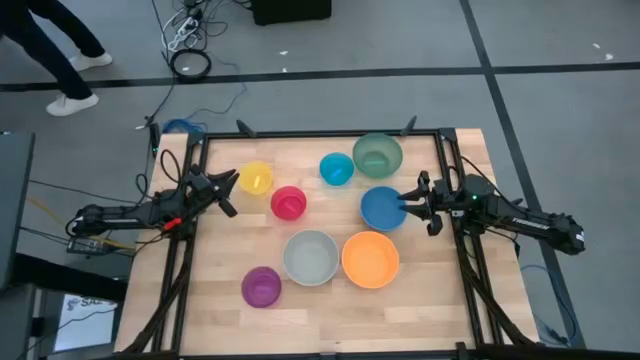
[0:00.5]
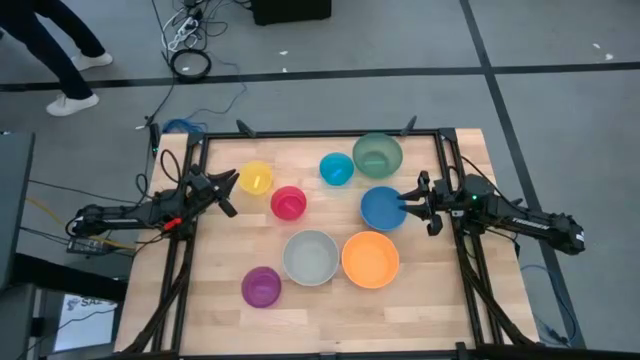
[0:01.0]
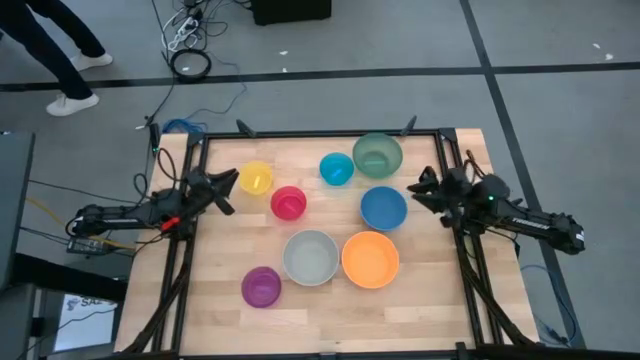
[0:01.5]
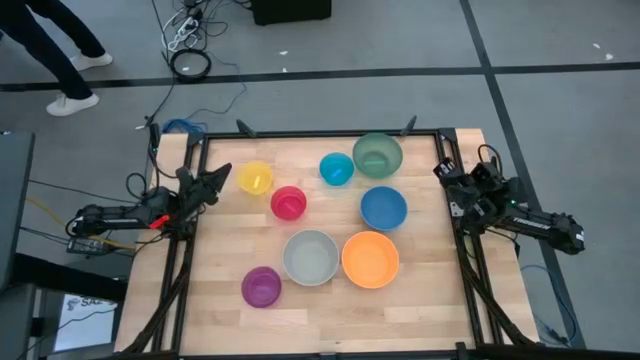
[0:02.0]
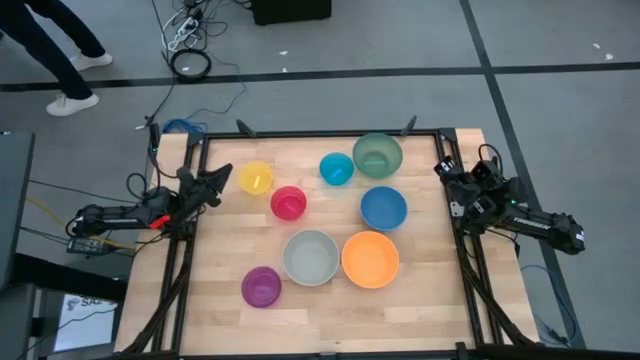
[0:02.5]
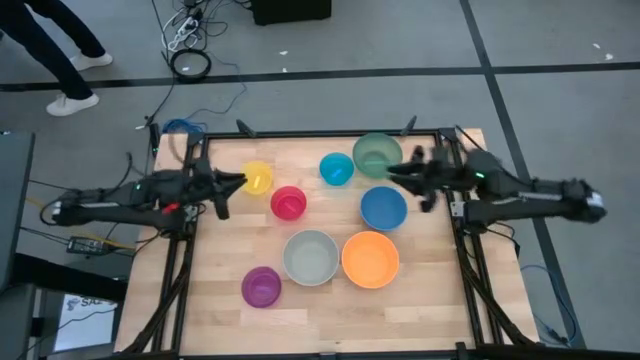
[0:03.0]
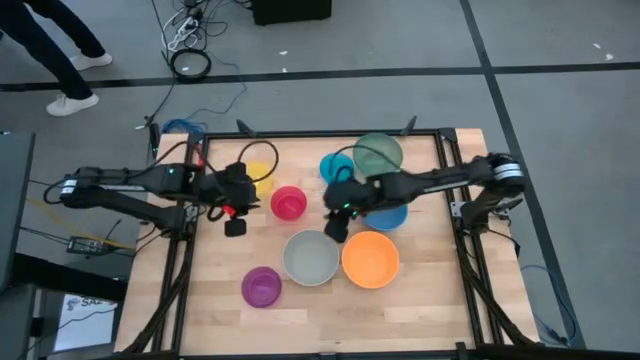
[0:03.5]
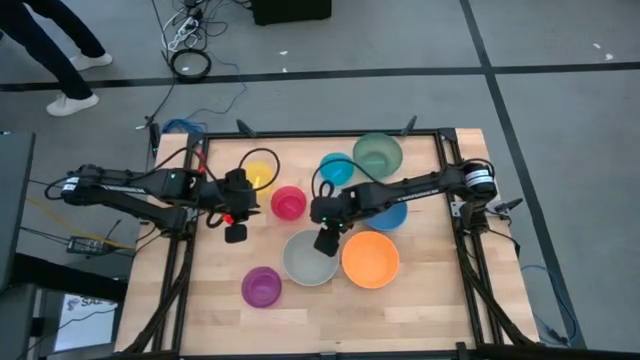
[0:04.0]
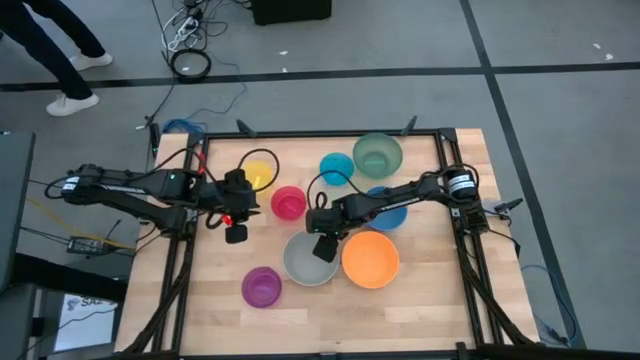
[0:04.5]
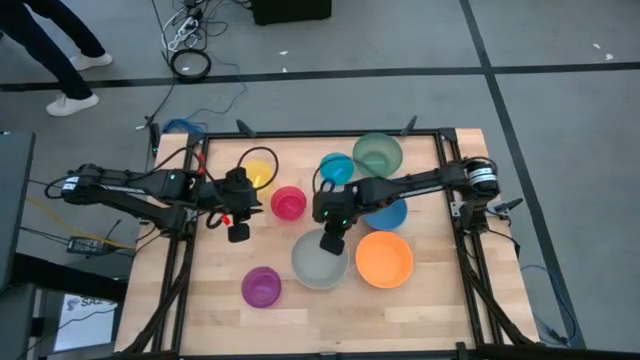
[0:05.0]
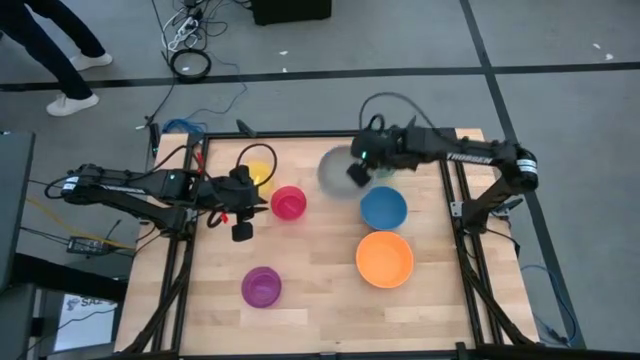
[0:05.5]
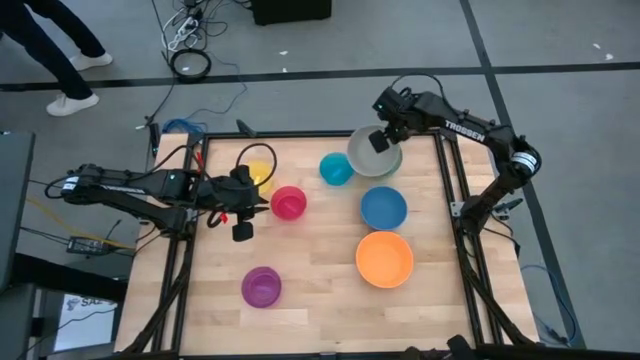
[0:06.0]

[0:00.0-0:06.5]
Stack the gray bowl into the green bowl

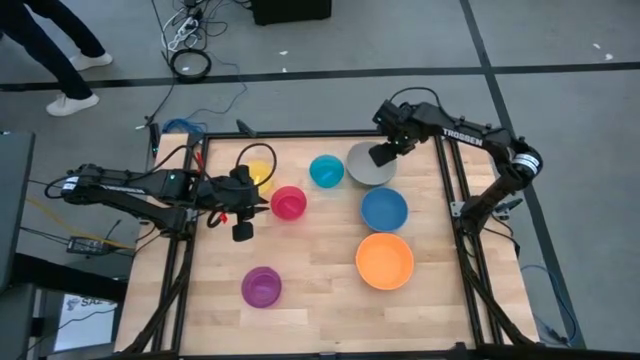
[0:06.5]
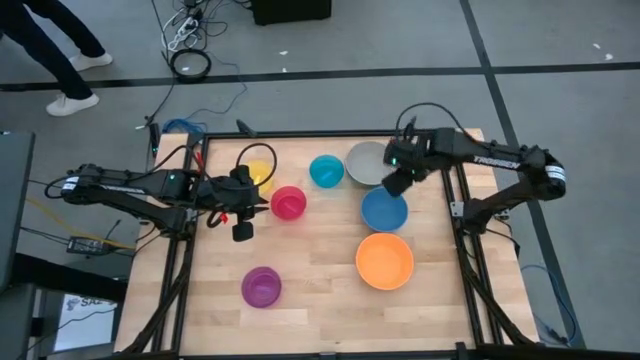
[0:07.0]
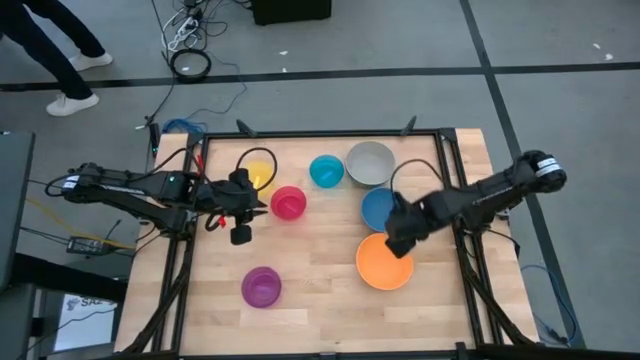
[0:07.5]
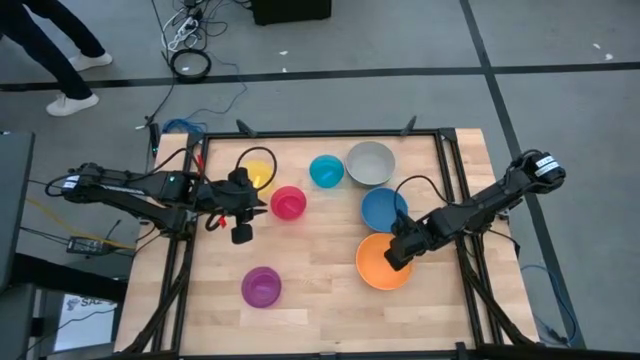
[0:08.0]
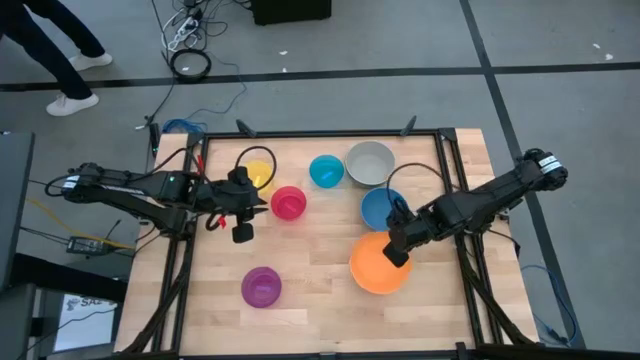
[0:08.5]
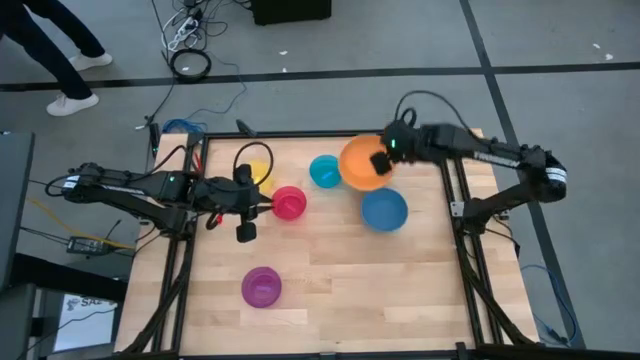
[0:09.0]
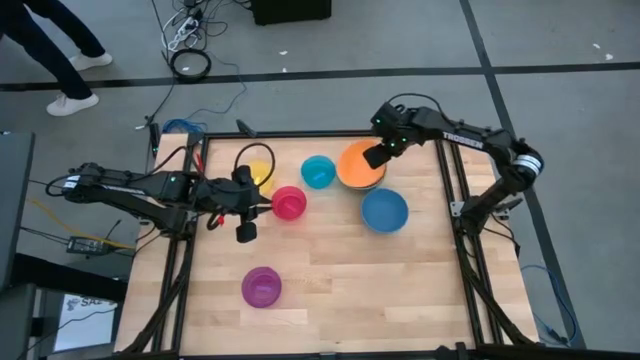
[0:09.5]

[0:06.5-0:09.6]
Stack the orange bowl into the grey bowl

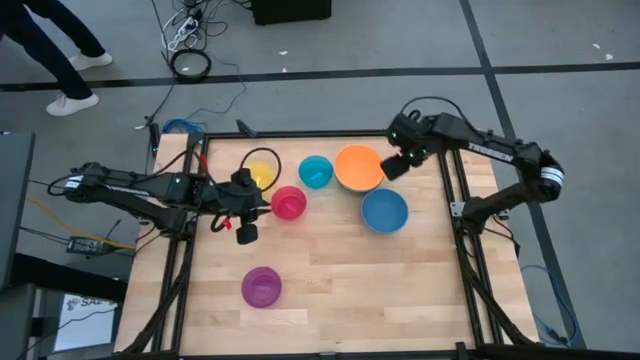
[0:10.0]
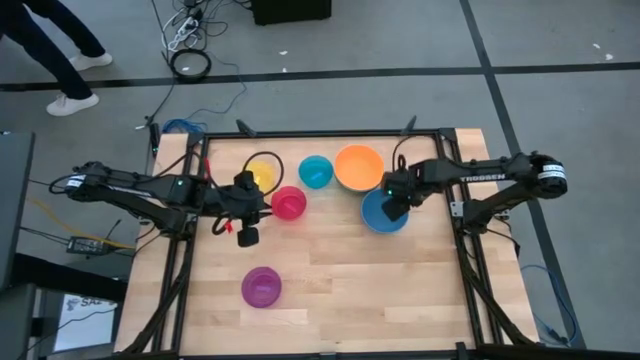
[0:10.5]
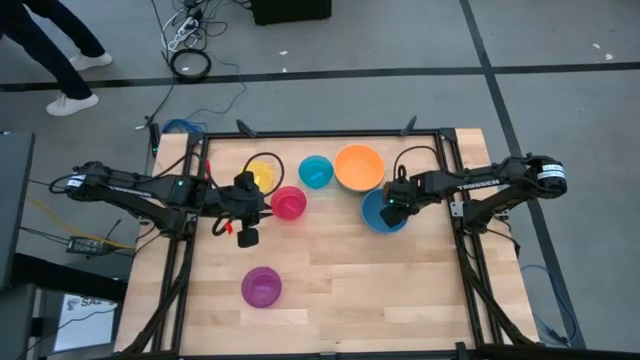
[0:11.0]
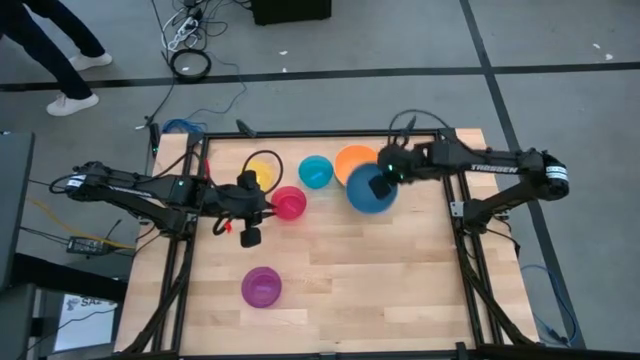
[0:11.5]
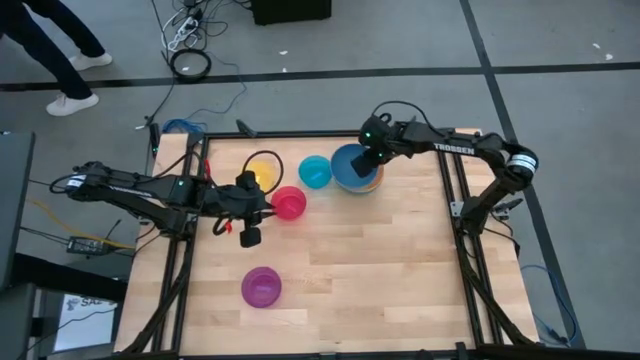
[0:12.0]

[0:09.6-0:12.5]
Stack the bottom blue bowl into the orange bowl

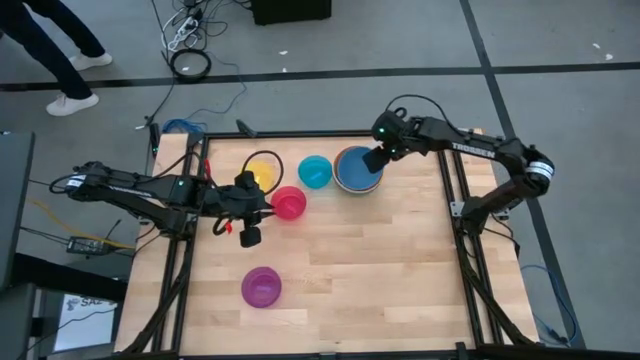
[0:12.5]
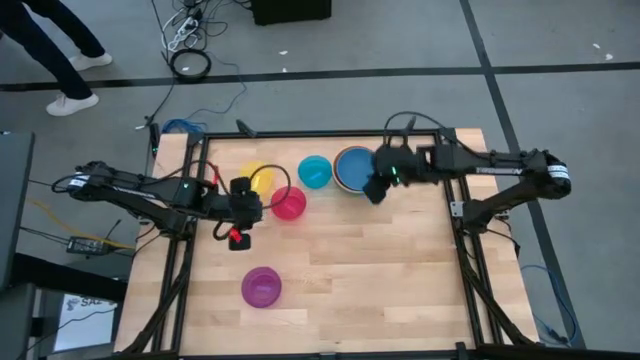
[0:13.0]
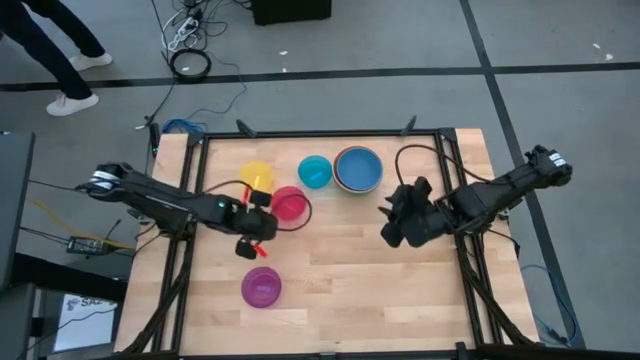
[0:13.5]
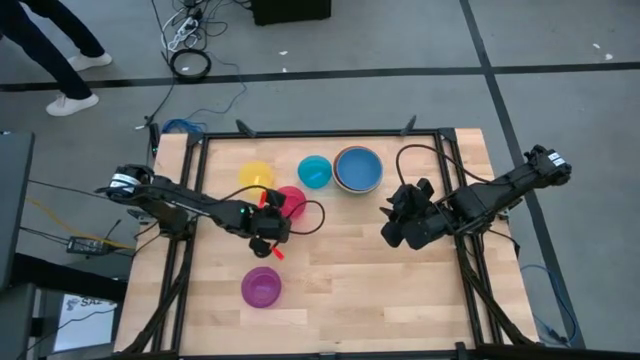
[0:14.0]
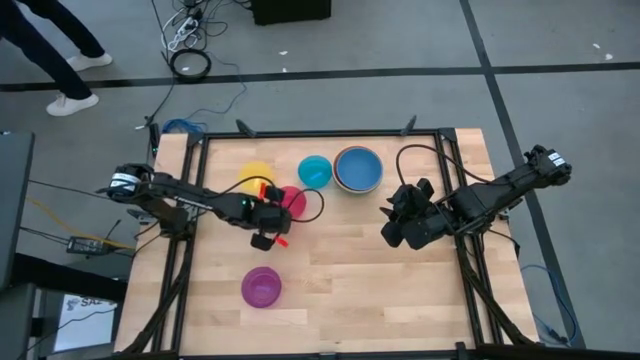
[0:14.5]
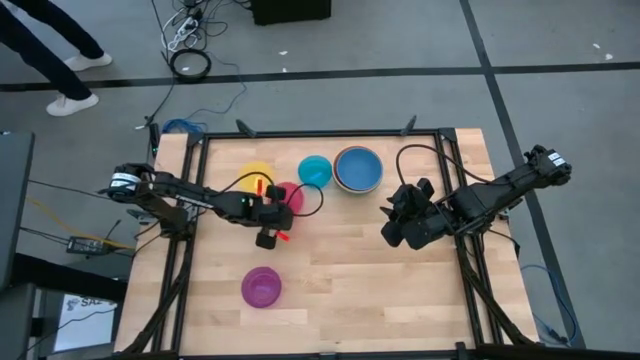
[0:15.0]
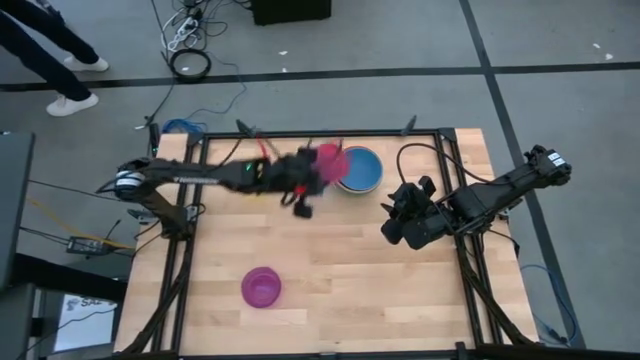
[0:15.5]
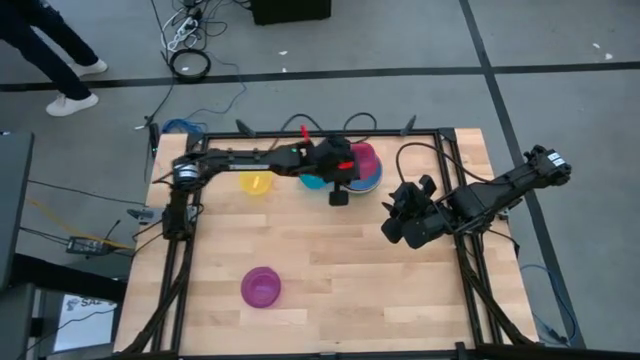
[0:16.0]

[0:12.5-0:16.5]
Stack the red bowl into the blue bowl

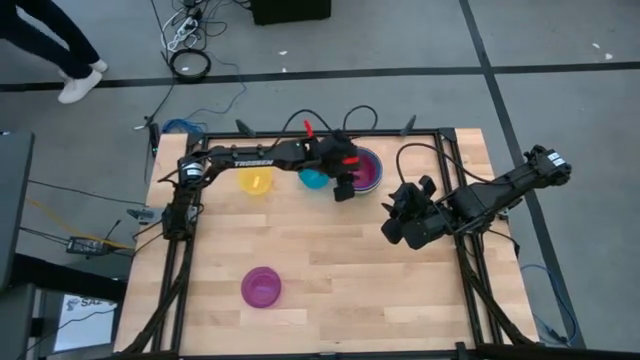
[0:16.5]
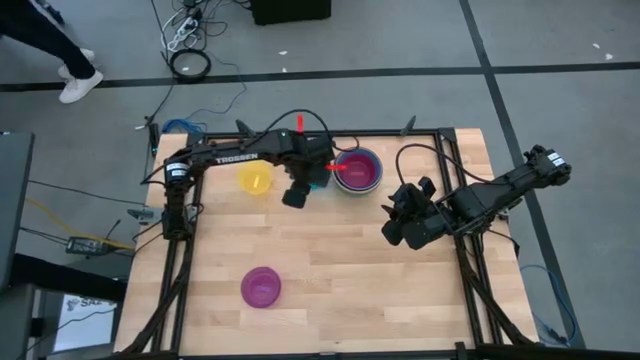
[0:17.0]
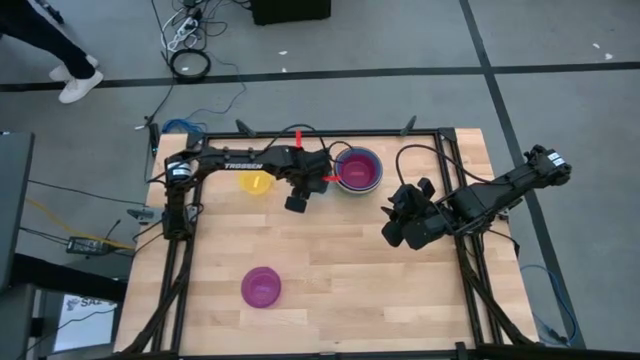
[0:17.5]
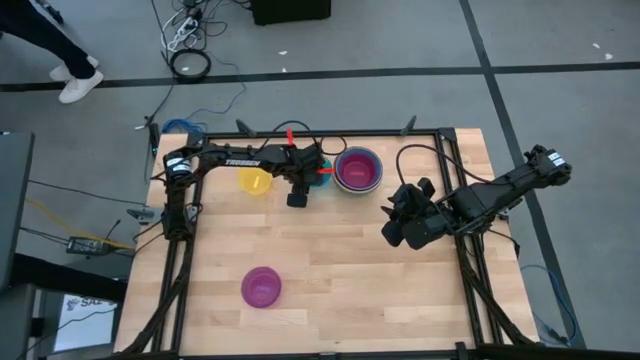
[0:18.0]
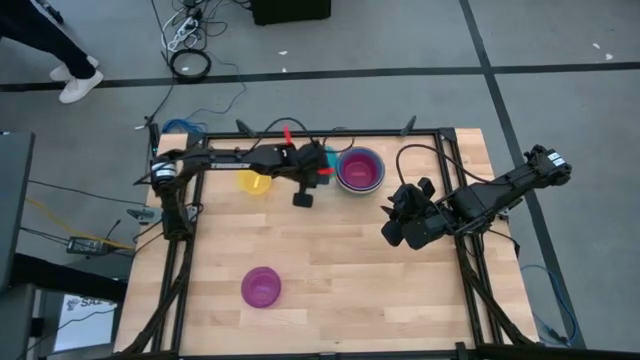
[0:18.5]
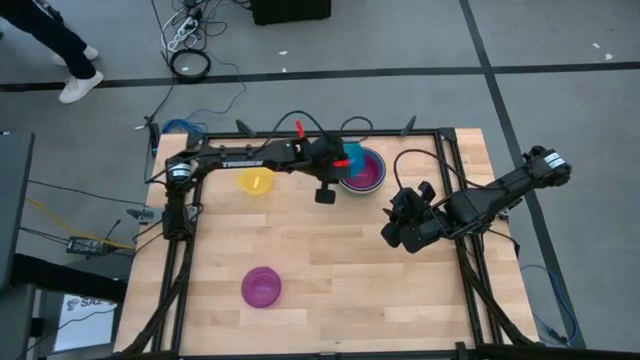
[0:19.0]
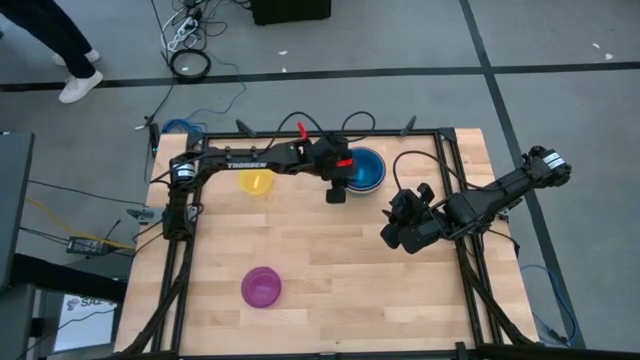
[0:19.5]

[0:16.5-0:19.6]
Stack the middle blue bowl into the red bowl

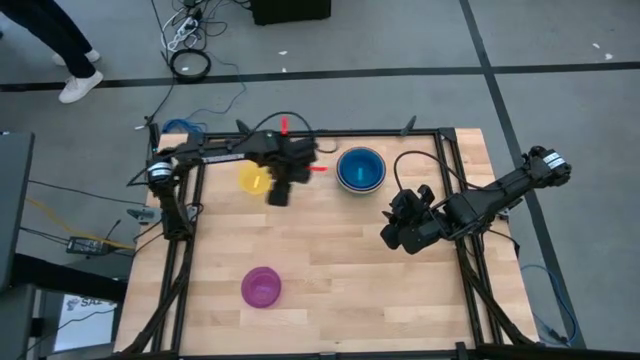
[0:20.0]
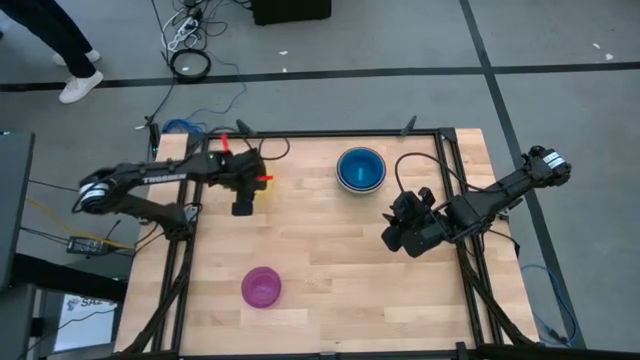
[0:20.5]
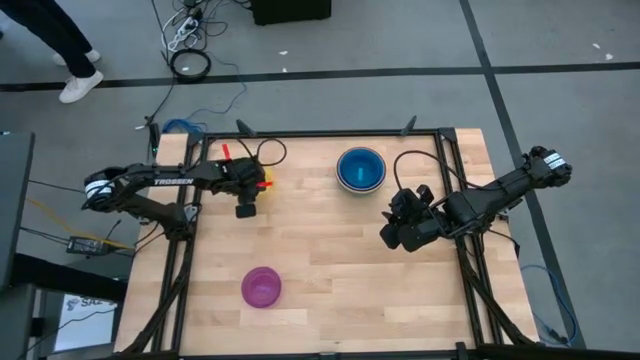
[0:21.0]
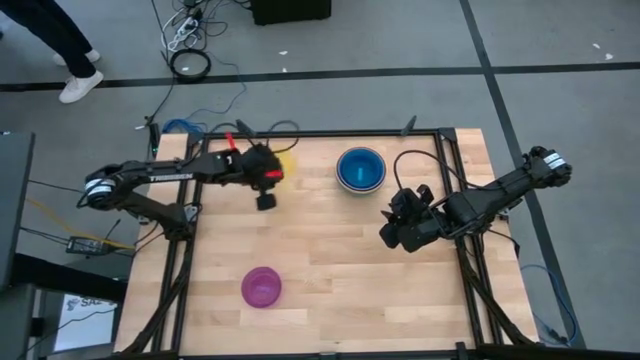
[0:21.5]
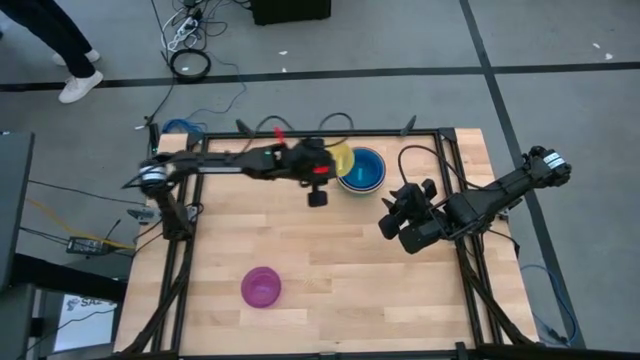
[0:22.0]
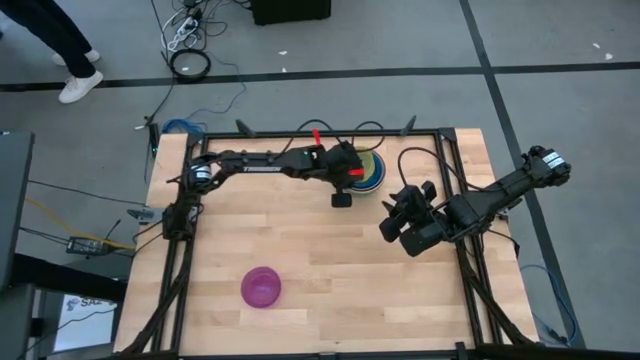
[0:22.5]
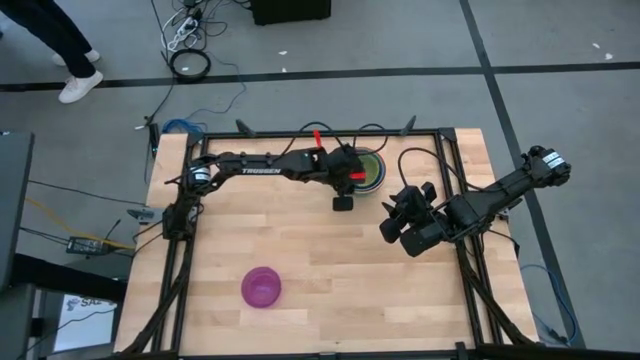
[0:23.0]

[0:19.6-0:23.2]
Stack the yellow bowl into the light blue bowl
